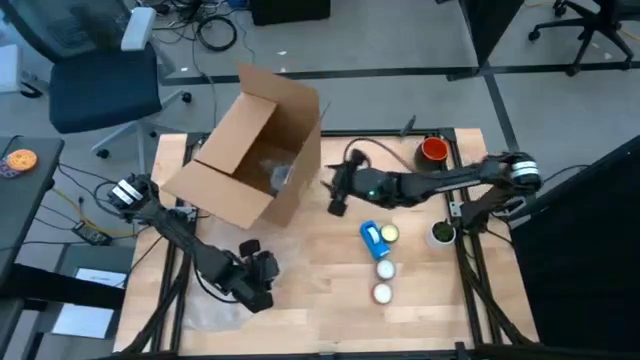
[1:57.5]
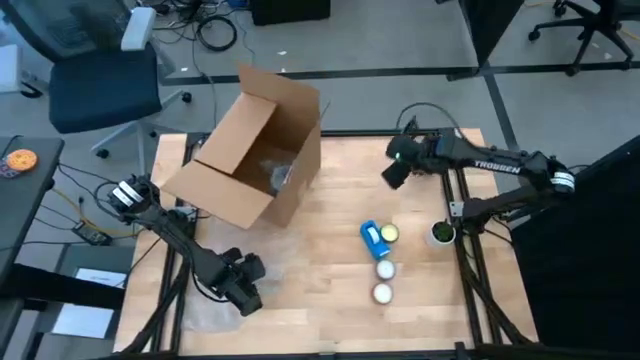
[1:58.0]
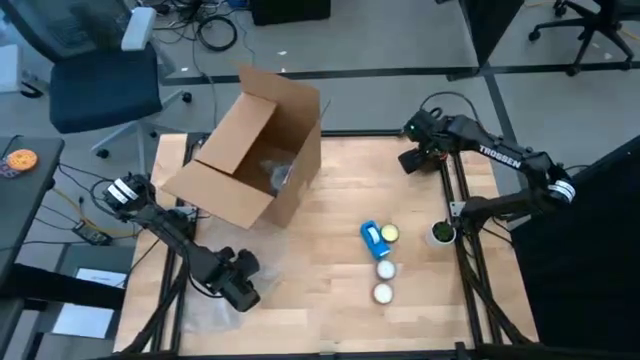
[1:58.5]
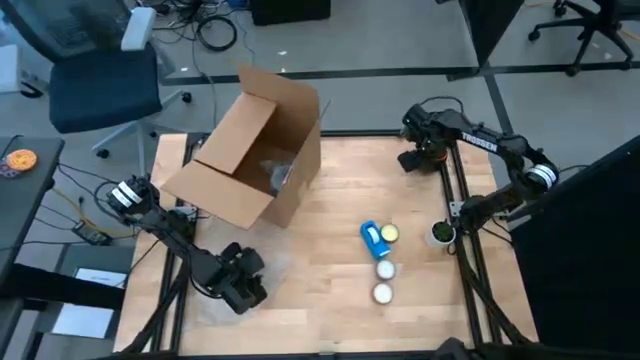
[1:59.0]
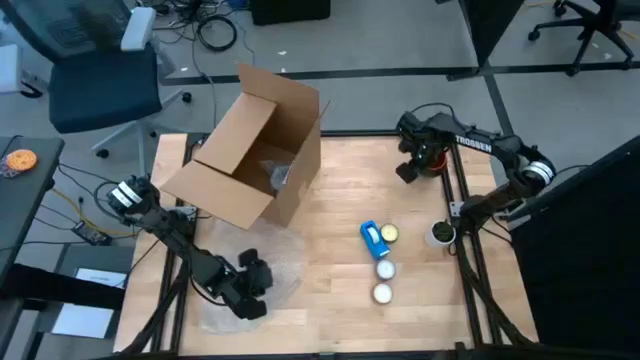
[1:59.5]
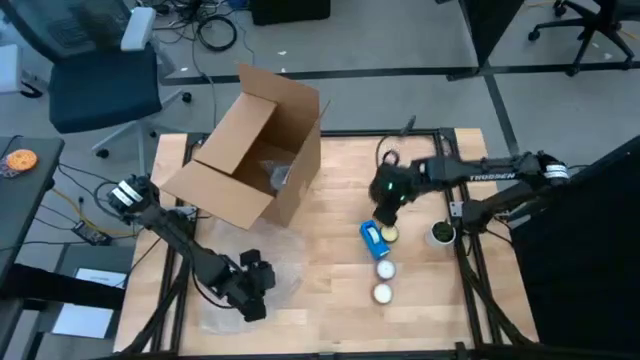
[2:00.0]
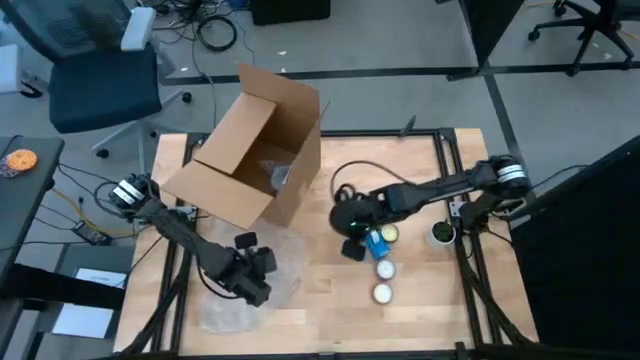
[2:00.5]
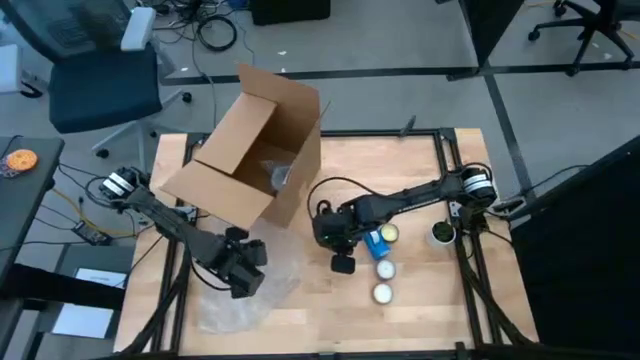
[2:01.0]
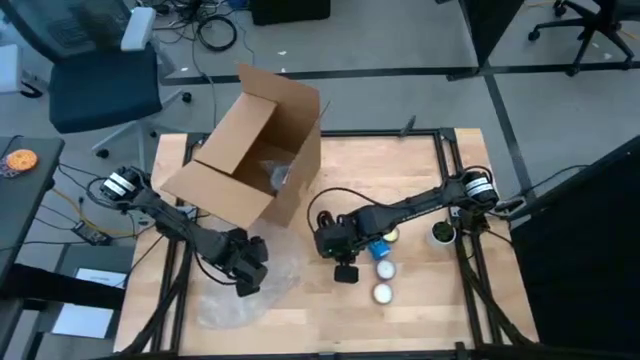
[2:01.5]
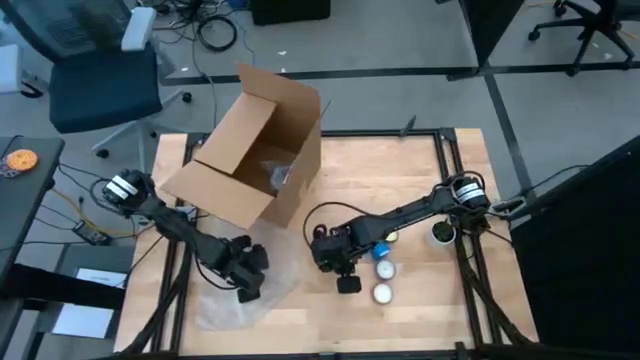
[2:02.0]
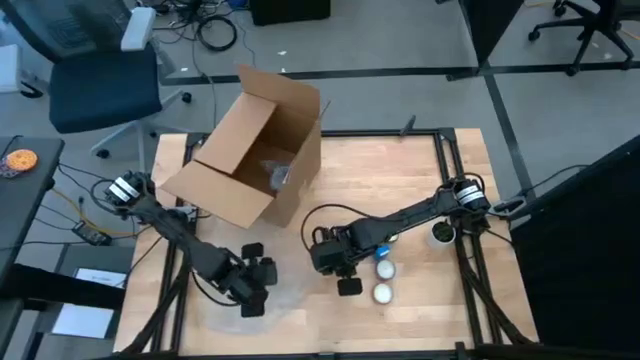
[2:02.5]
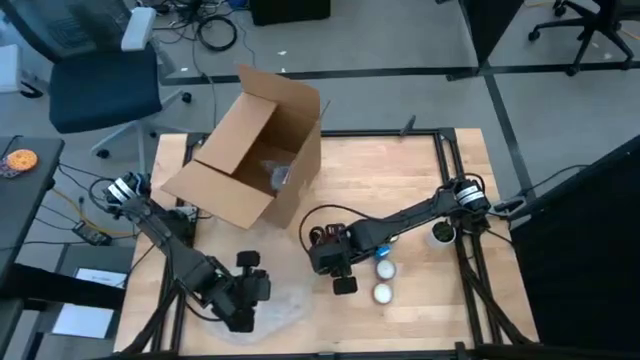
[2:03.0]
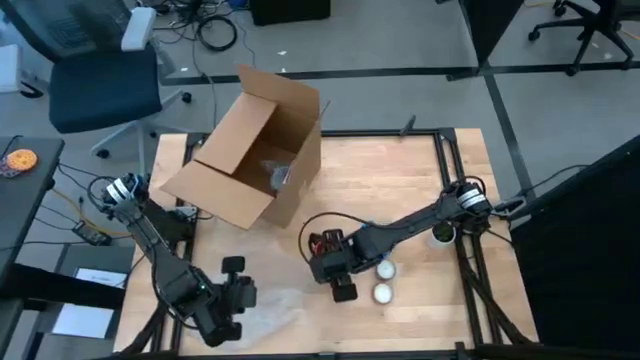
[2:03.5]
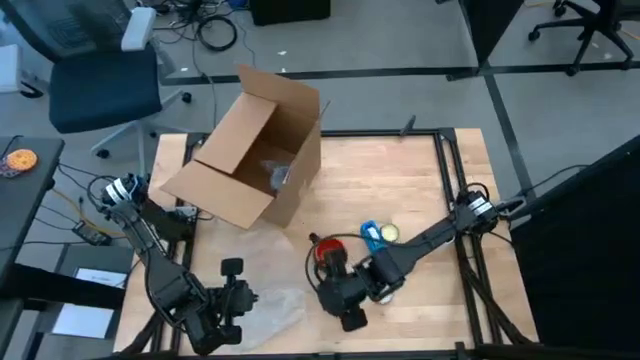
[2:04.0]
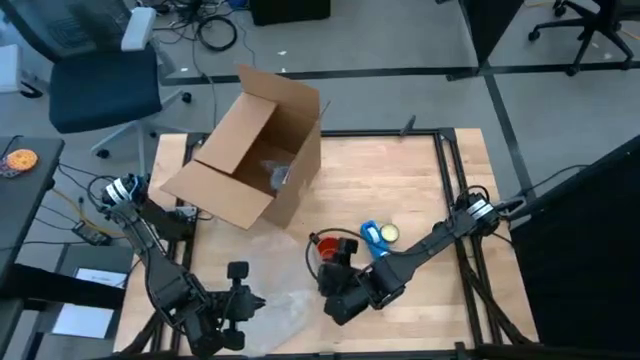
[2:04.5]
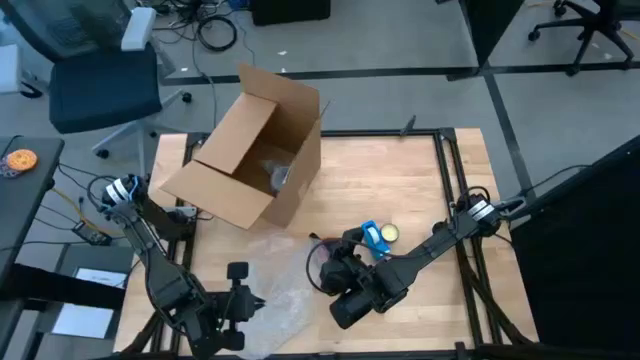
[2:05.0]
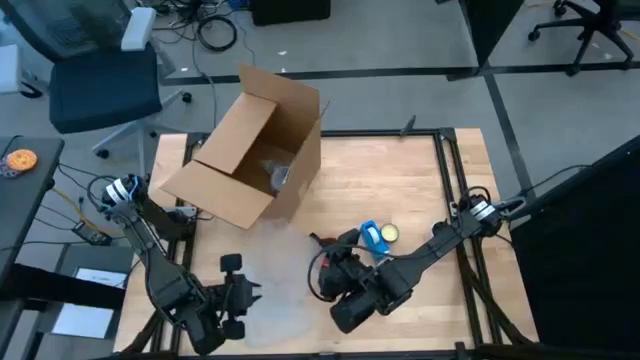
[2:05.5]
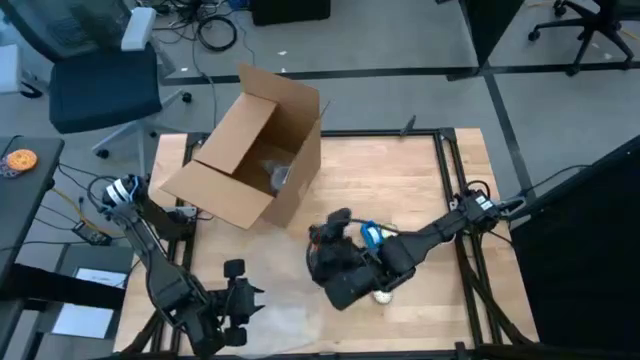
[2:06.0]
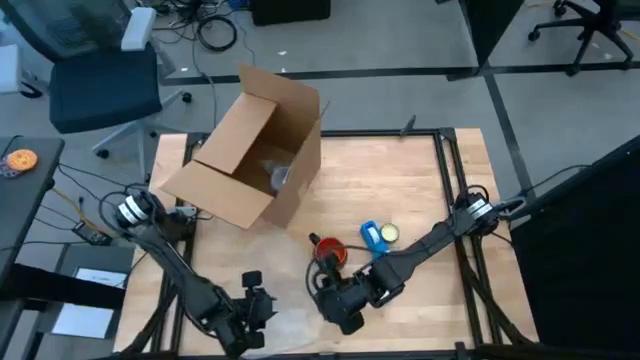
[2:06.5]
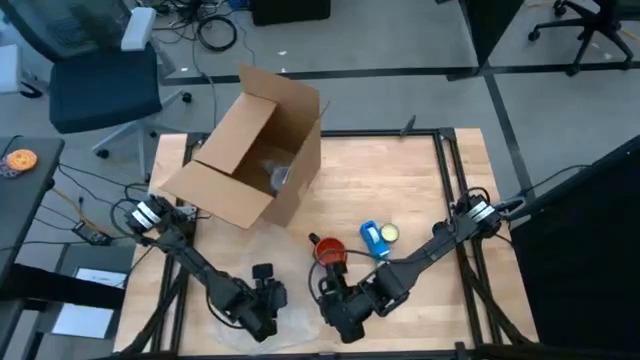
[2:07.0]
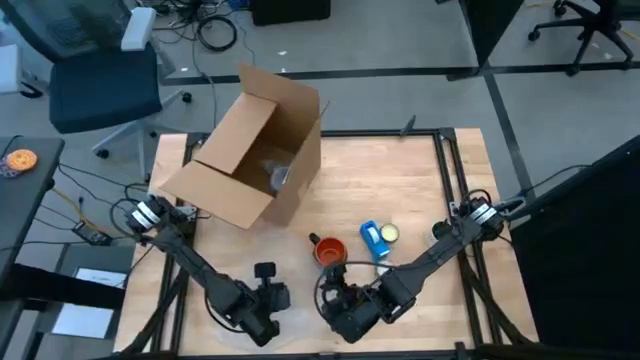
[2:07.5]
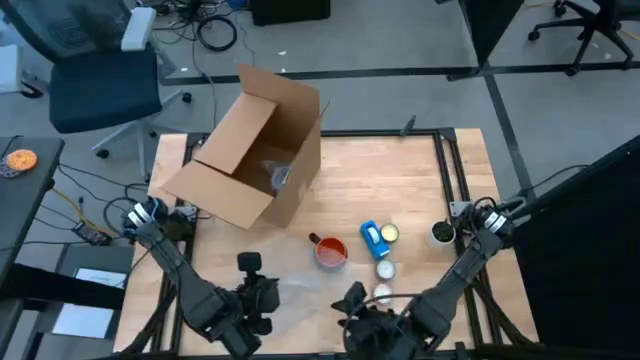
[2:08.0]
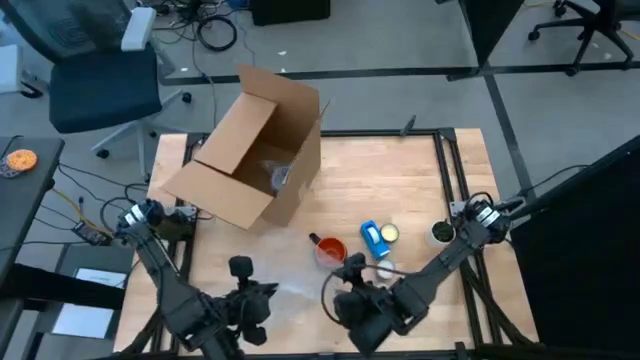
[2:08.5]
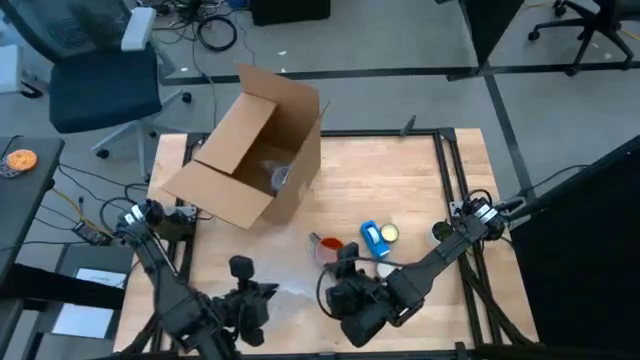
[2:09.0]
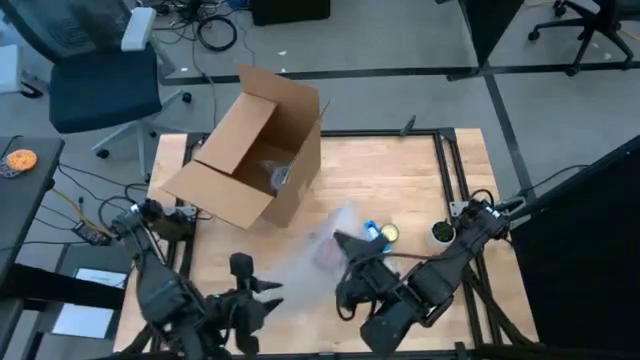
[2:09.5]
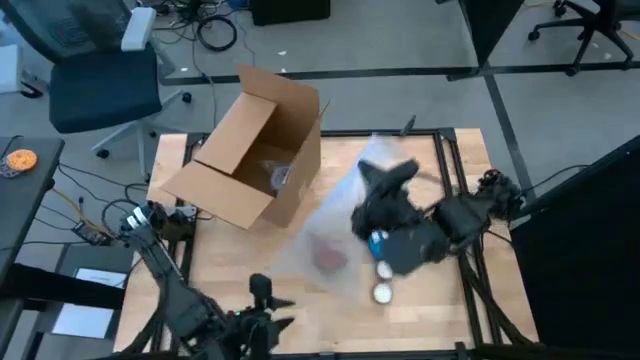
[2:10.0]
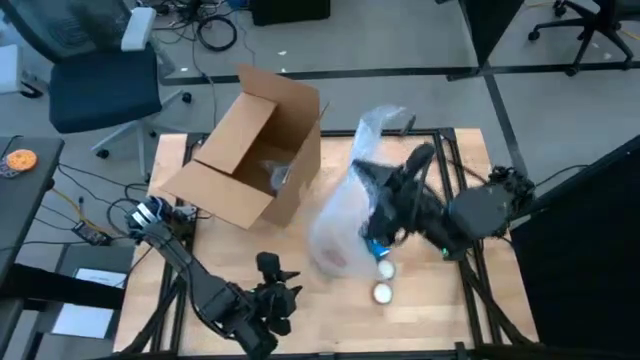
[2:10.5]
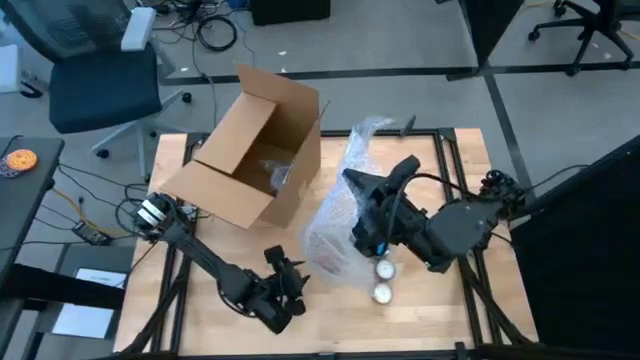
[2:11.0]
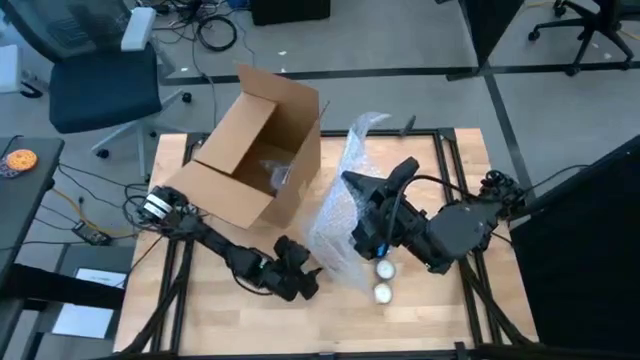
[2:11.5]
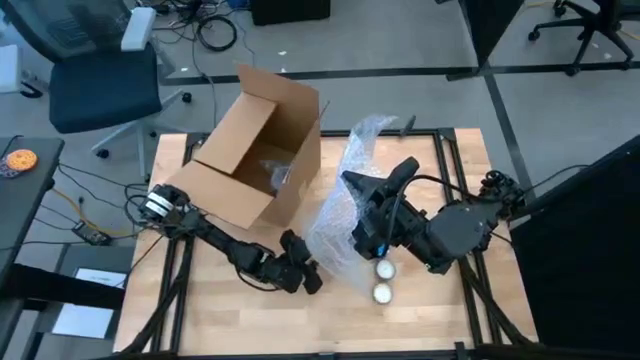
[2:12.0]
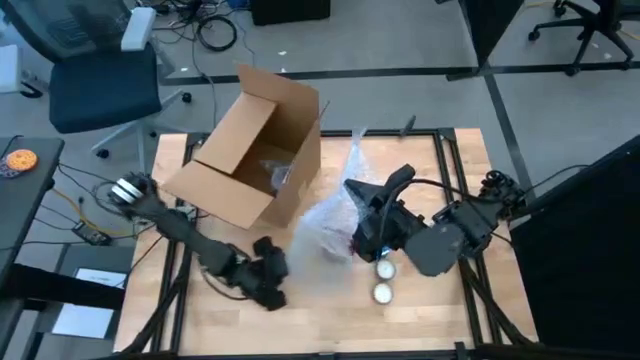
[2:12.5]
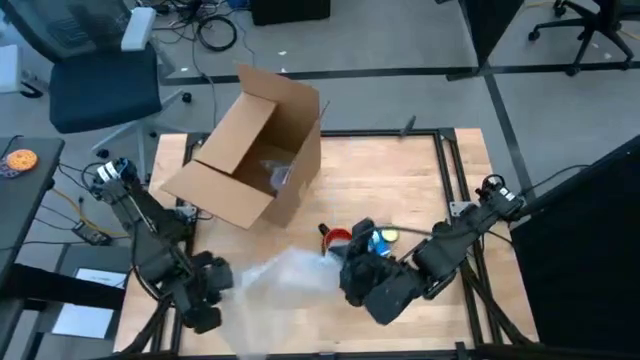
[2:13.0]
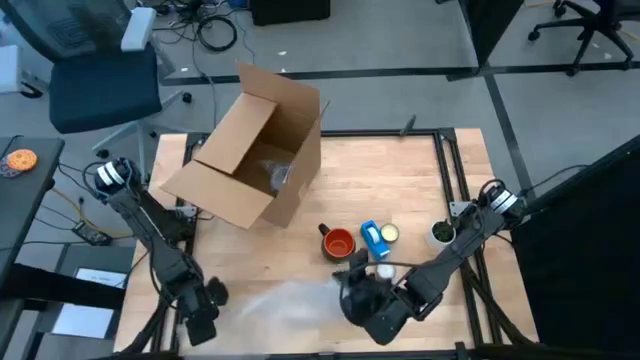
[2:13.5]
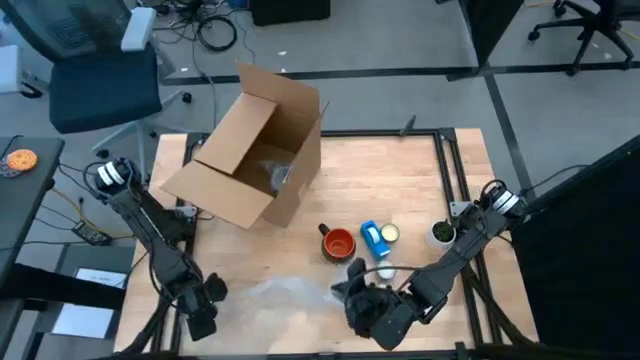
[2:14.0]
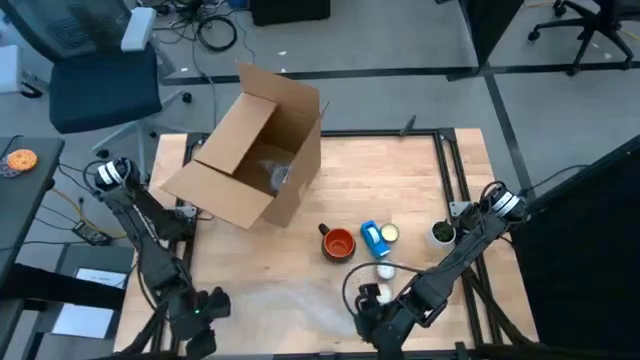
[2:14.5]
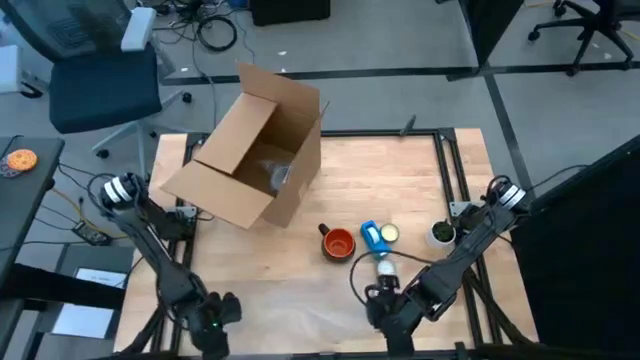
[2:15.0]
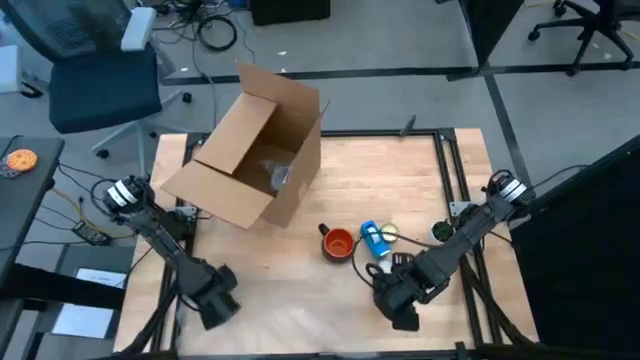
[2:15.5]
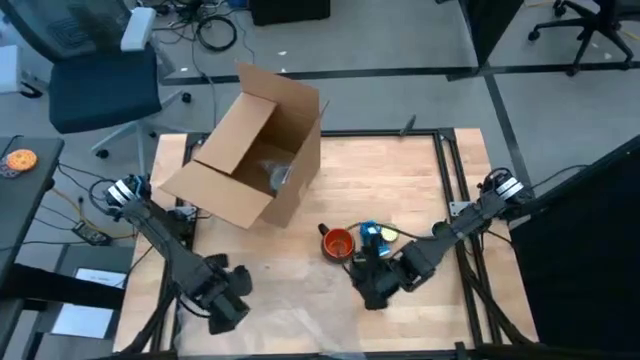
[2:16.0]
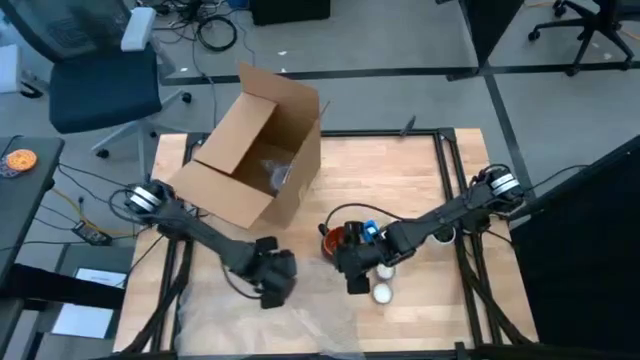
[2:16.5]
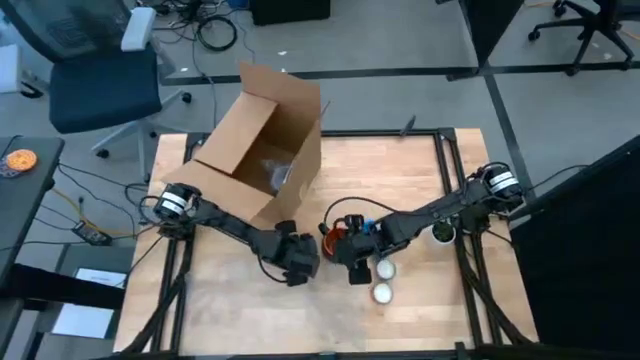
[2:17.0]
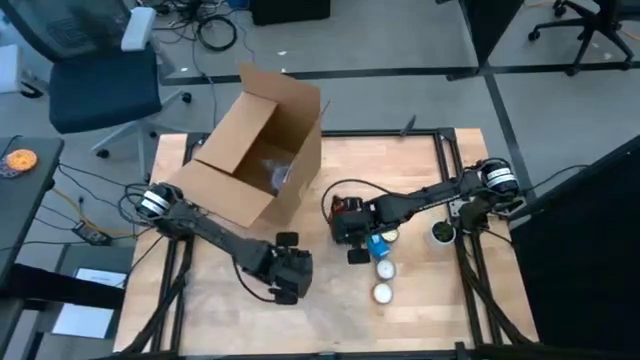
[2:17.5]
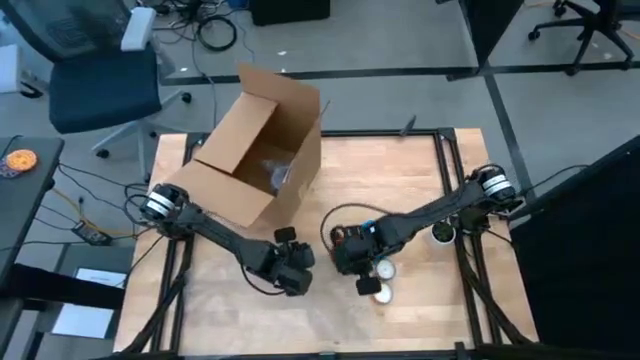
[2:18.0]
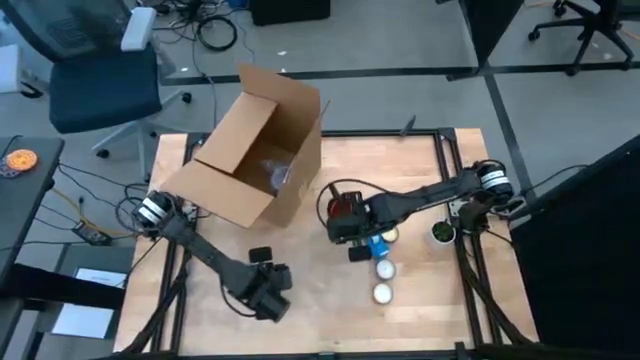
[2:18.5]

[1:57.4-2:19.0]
Task: wrap mug
Wrap the mug with the bubble wrap
